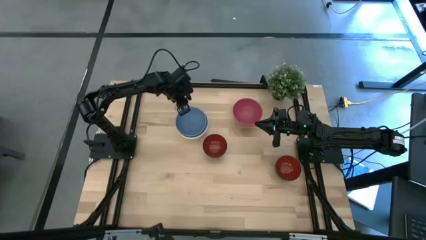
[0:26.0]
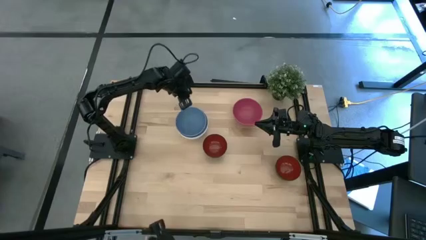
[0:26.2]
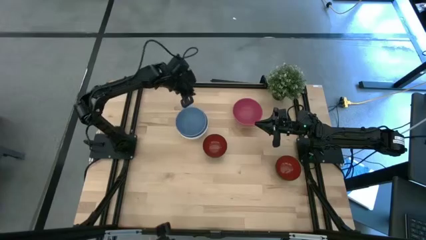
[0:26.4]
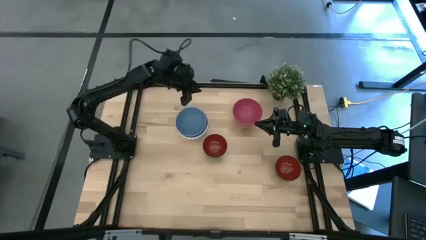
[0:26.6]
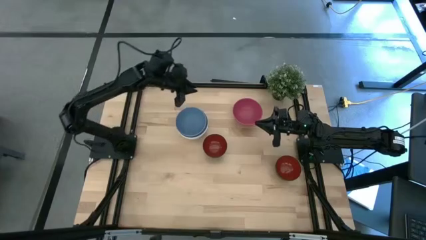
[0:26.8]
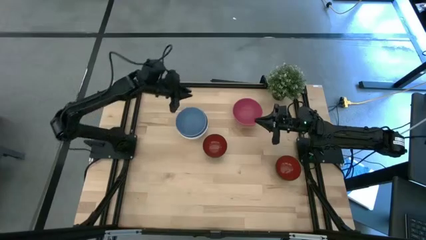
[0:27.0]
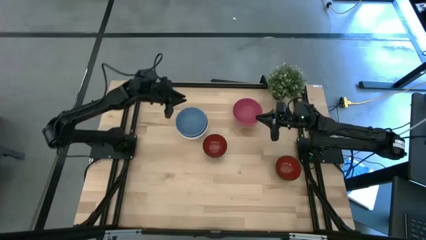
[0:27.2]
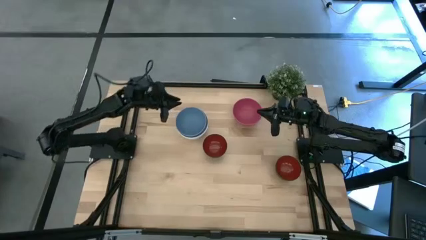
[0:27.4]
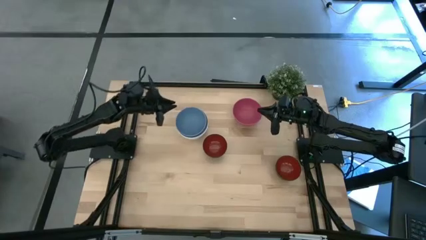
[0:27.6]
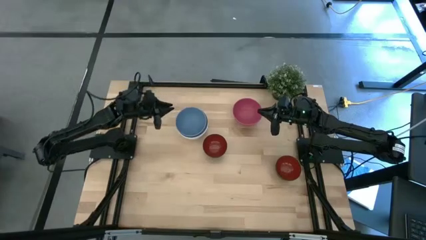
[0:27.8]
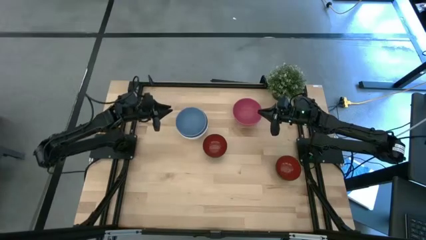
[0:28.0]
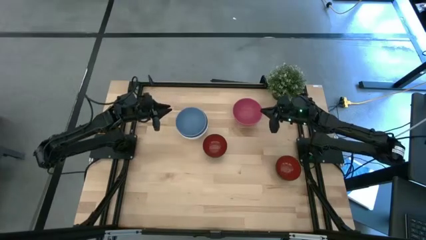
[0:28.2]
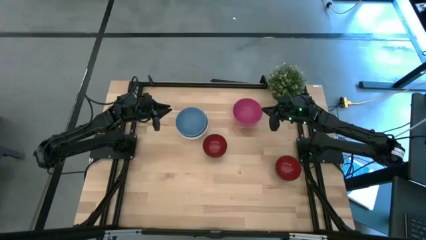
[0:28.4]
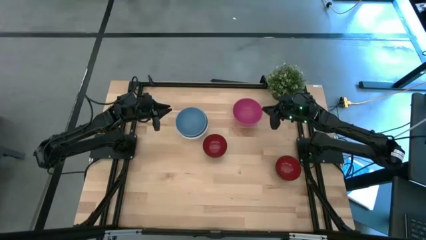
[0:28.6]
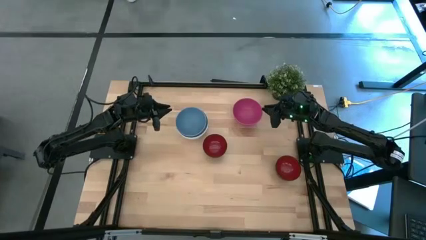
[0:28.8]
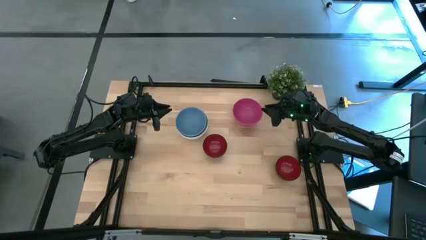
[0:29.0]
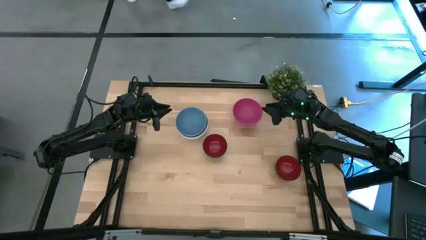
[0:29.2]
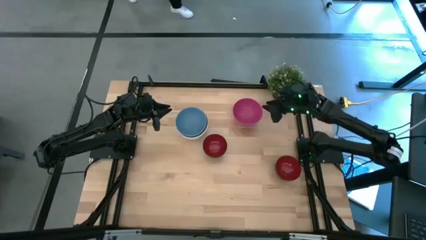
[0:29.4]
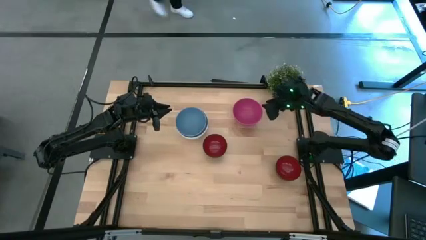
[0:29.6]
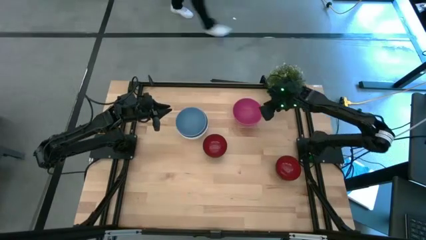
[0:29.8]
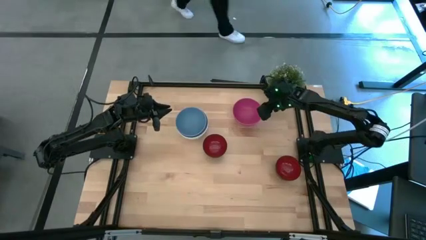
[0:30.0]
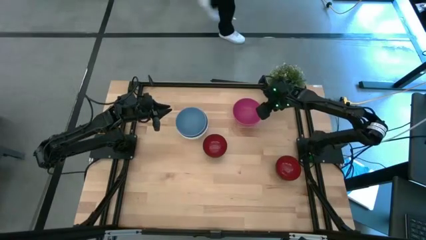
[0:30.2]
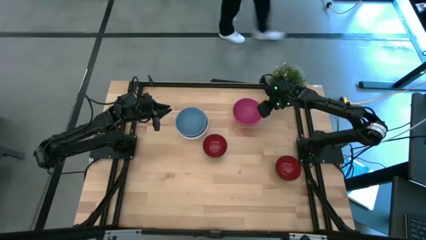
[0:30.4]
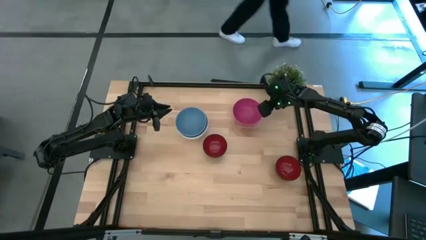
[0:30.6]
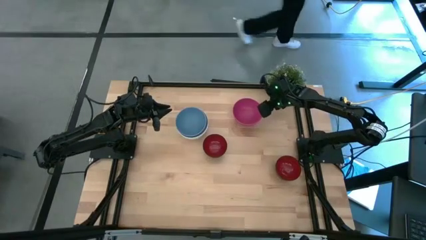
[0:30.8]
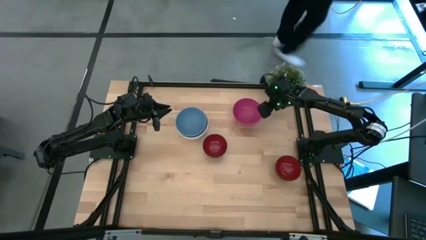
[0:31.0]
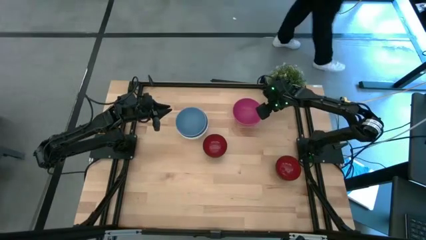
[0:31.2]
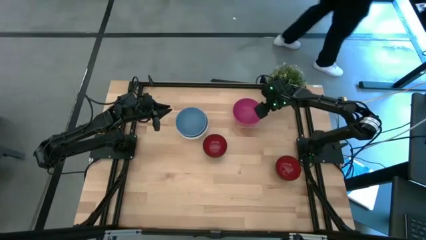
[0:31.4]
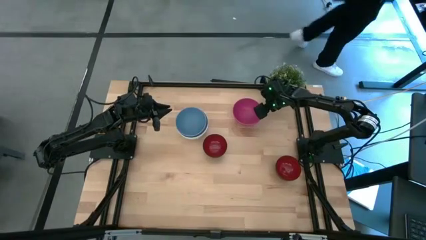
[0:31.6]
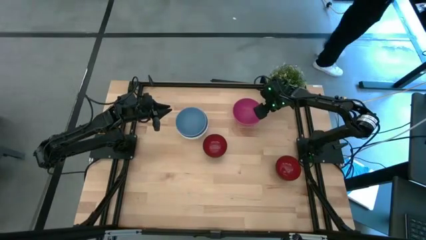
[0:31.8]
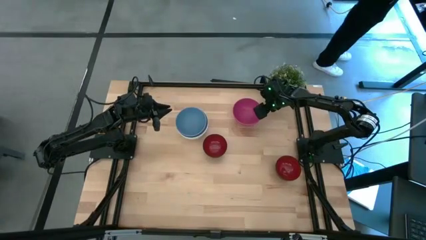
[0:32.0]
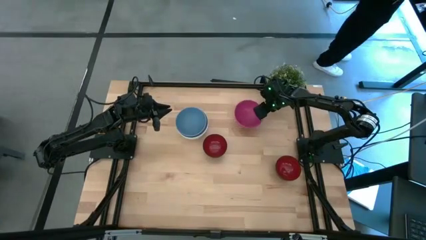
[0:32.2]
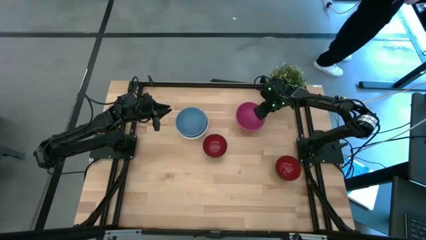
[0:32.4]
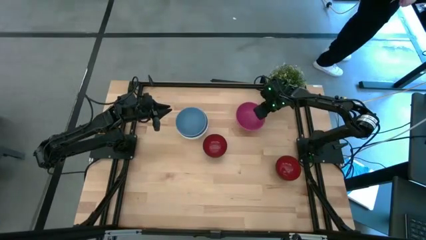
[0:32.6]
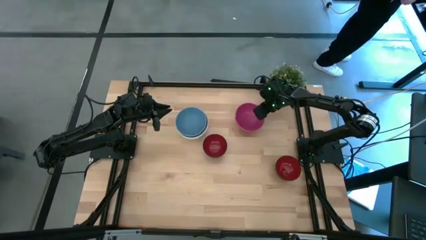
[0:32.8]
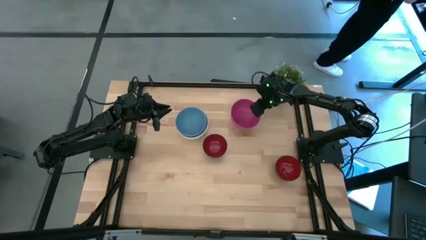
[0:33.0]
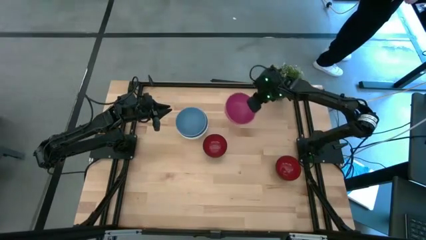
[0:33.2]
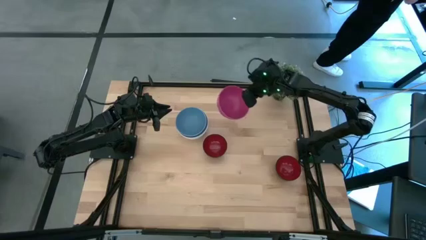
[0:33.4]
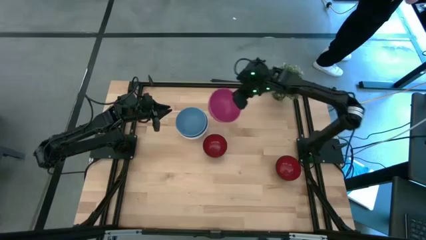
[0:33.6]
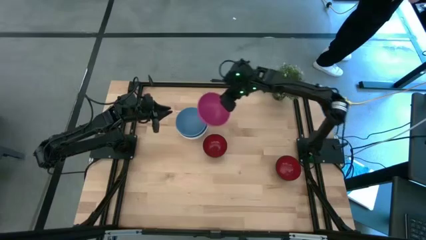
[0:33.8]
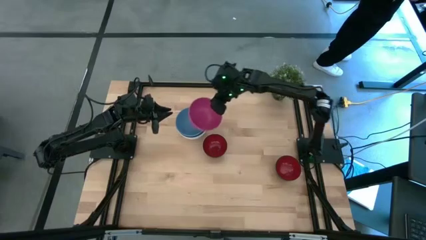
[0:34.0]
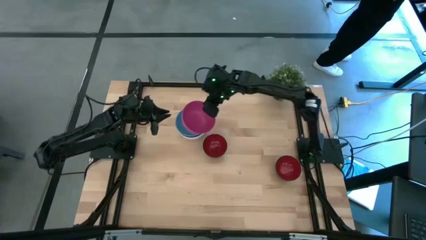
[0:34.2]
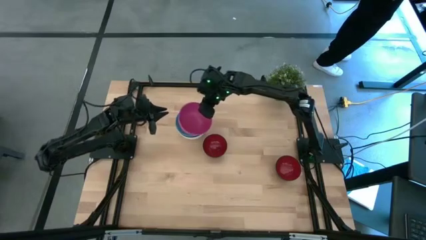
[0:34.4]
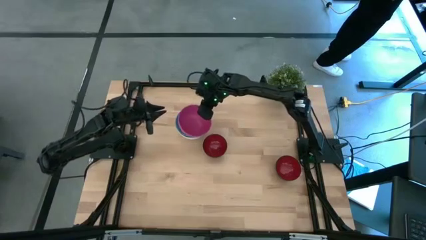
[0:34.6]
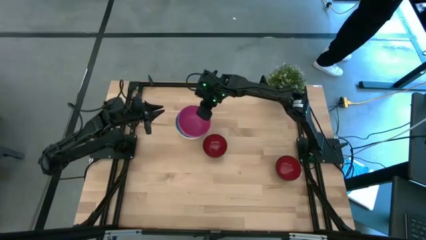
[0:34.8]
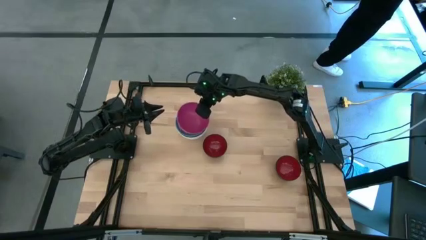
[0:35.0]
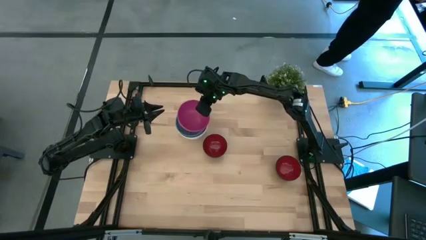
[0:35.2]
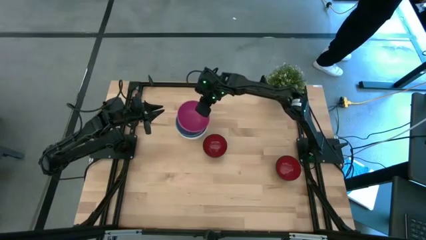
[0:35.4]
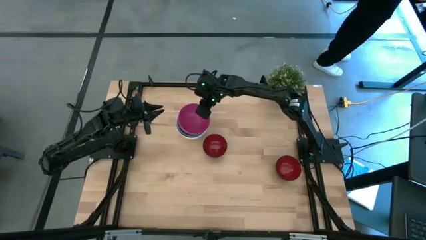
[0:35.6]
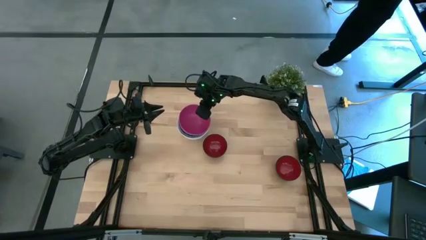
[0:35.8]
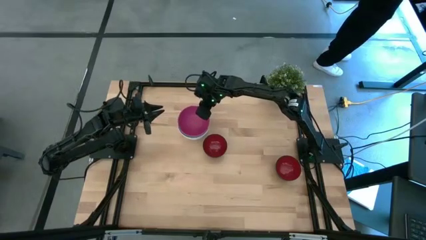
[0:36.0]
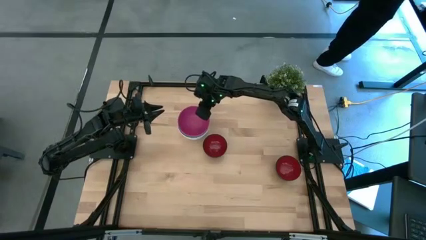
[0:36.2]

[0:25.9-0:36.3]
Task: Nest bowls inside each other
Stack the pink bowl into the blue bowl

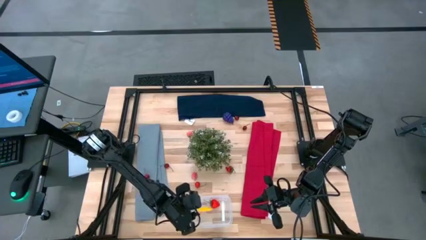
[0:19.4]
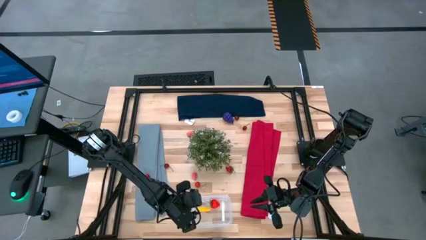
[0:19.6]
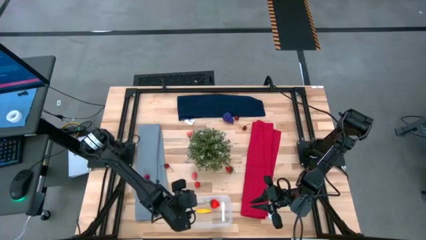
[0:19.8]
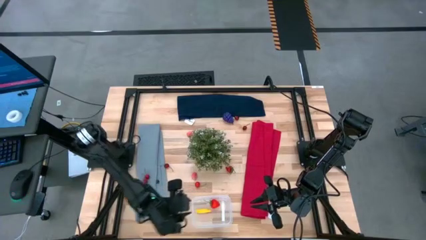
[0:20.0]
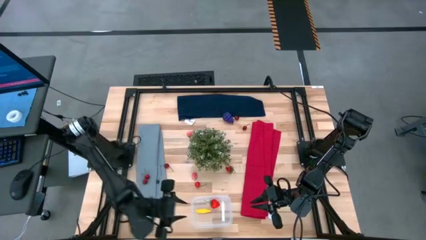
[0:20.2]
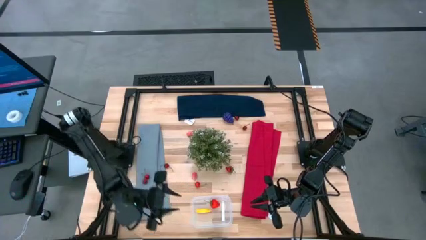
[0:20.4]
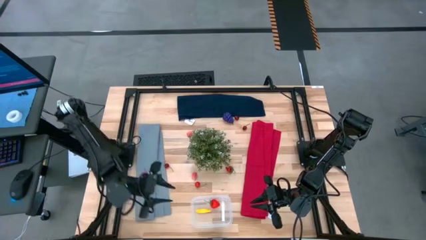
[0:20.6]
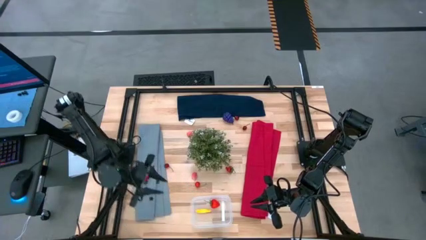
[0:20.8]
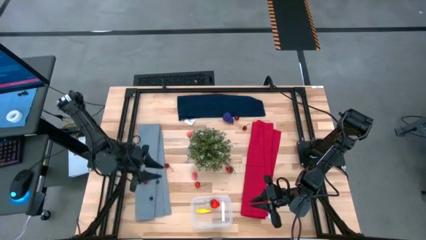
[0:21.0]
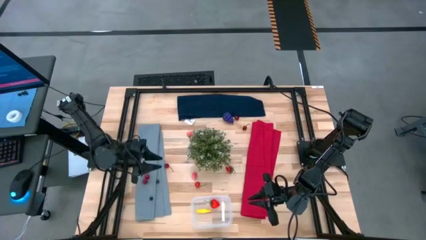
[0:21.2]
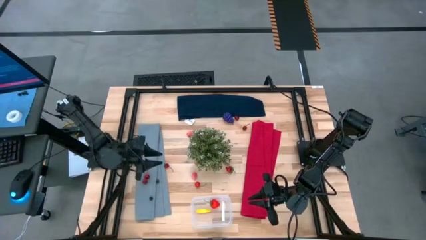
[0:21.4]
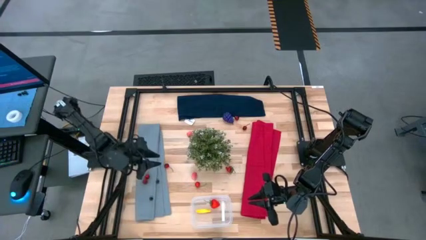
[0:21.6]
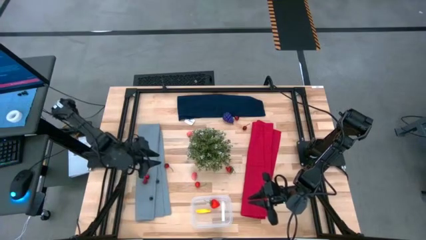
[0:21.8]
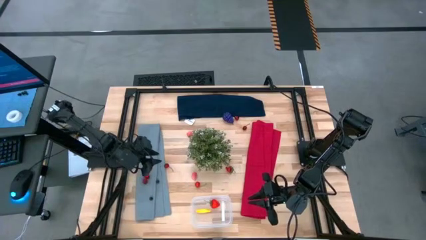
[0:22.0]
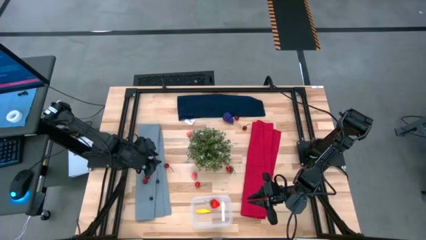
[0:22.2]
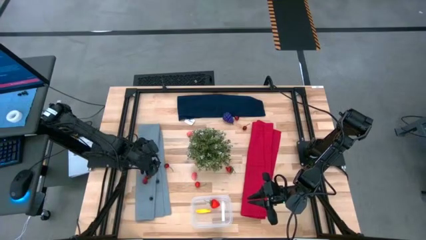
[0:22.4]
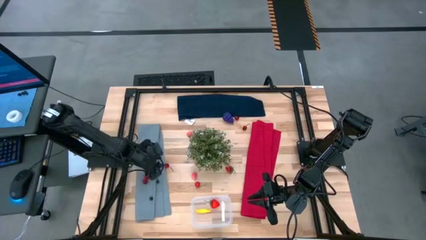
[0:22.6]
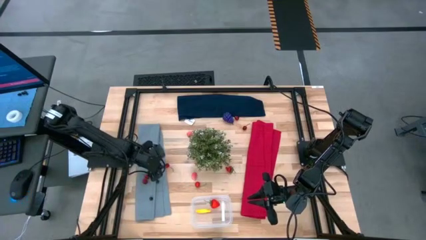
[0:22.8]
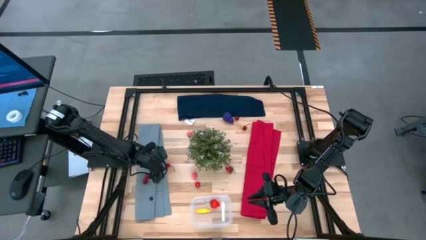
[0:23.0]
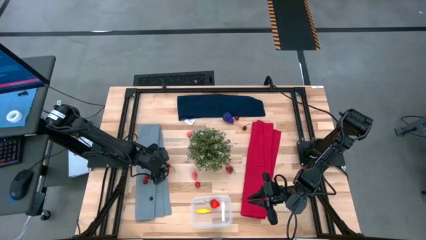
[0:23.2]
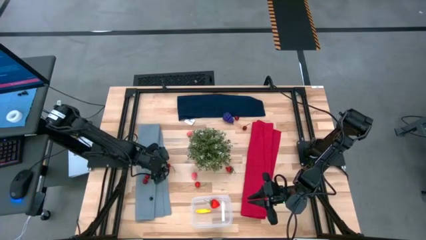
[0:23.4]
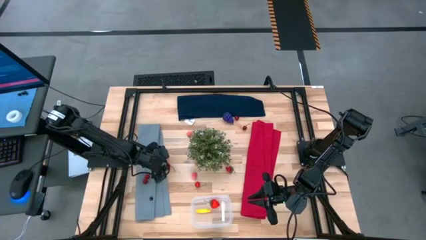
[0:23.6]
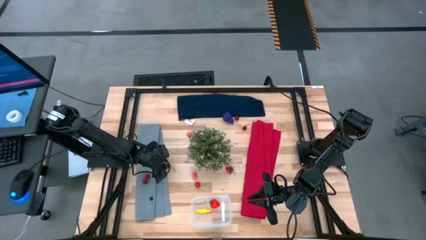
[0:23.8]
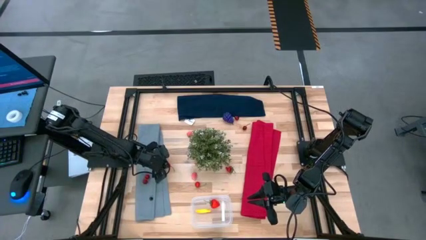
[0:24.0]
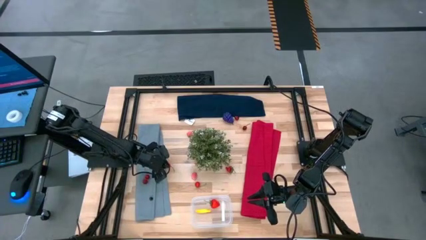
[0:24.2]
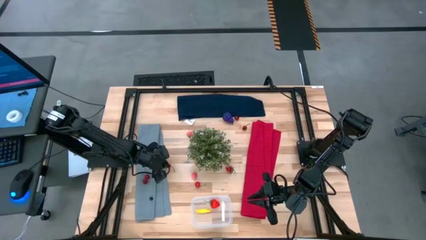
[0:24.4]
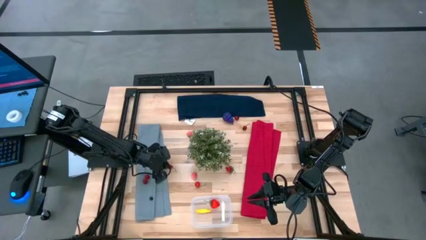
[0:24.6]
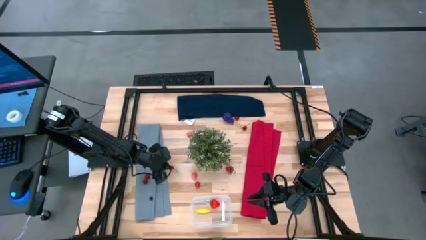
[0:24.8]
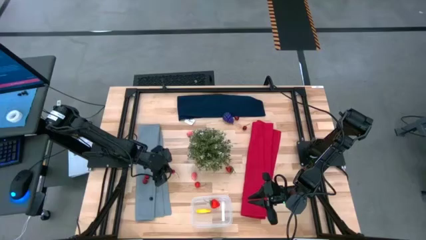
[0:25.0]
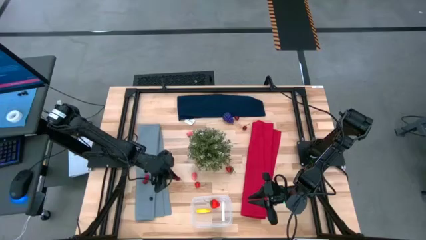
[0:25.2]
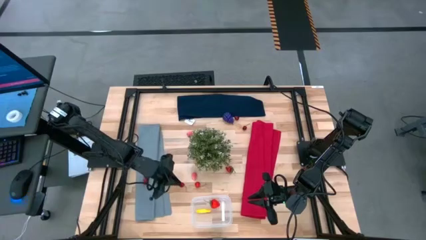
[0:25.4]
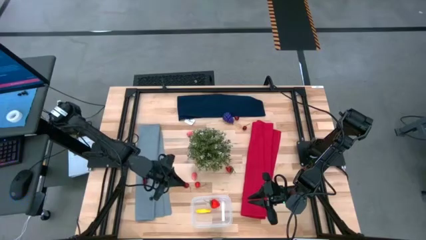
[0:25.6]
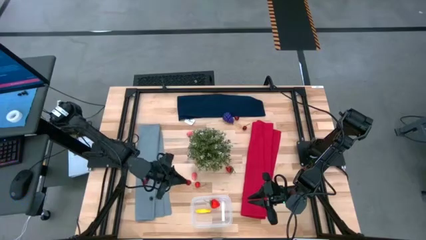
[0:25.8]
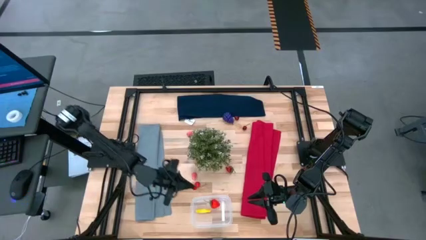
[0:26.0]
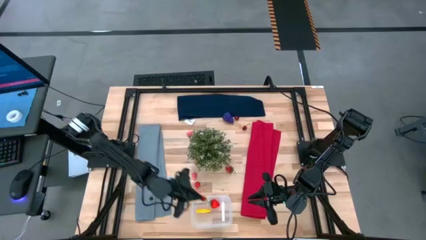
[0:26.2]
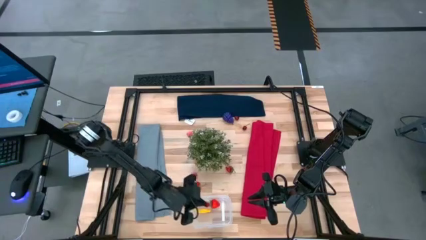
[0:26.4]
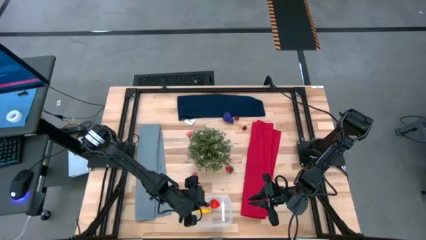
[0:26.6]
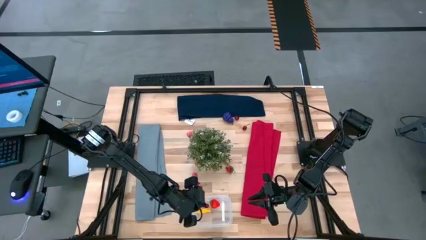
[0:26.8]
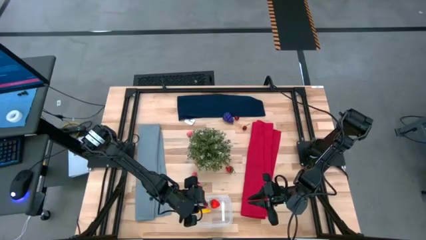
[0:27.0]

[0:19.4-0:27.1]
Task: Pick and placing Produce into tupperware
Put the cherry into the transparent container
